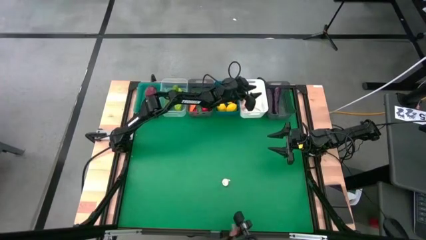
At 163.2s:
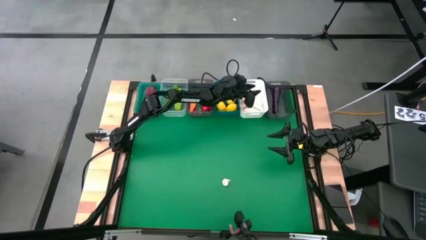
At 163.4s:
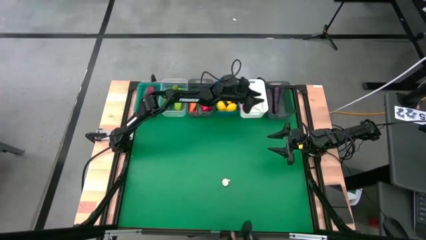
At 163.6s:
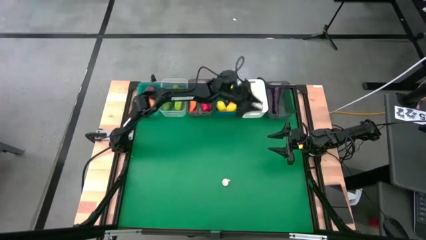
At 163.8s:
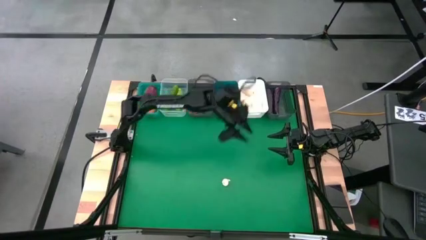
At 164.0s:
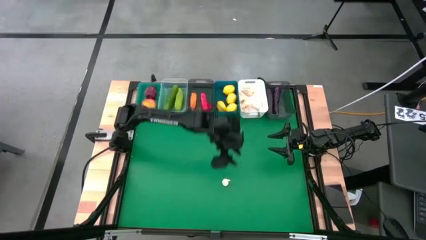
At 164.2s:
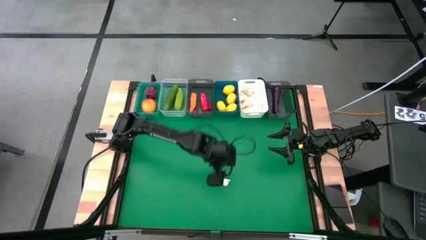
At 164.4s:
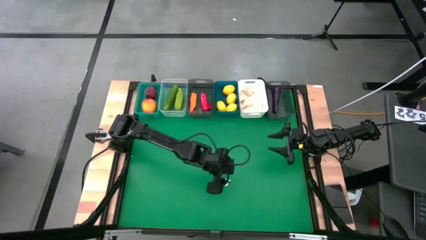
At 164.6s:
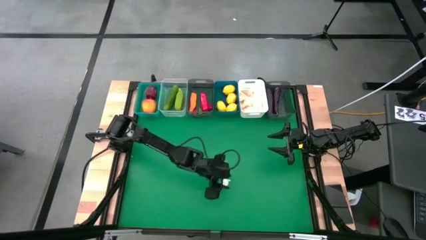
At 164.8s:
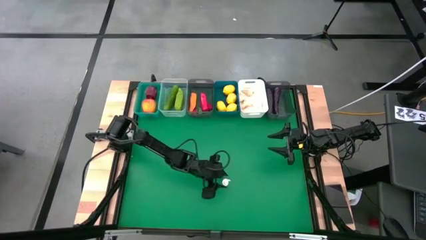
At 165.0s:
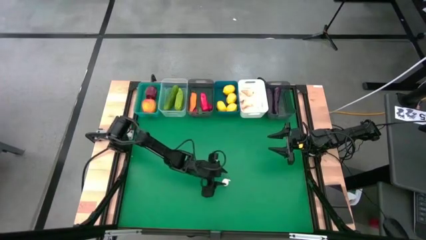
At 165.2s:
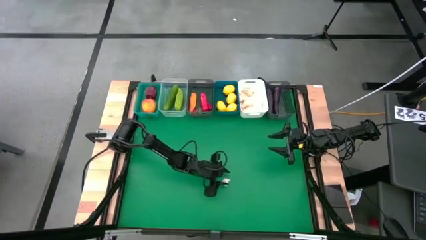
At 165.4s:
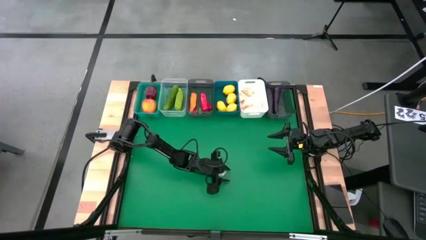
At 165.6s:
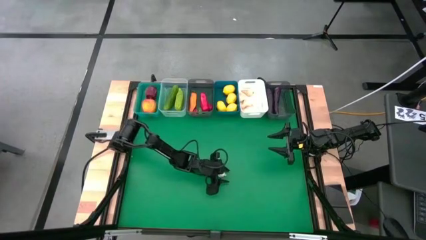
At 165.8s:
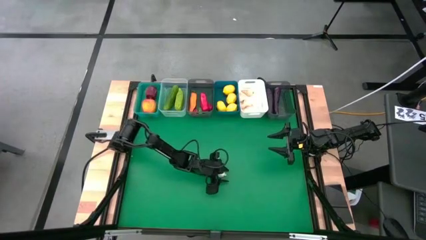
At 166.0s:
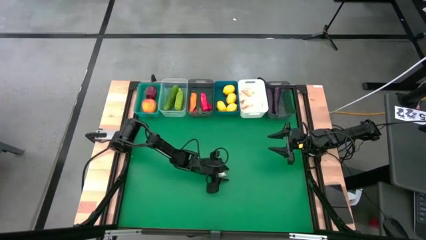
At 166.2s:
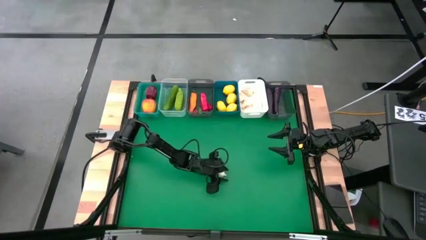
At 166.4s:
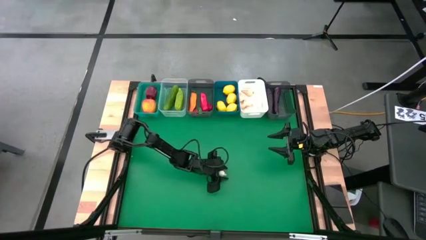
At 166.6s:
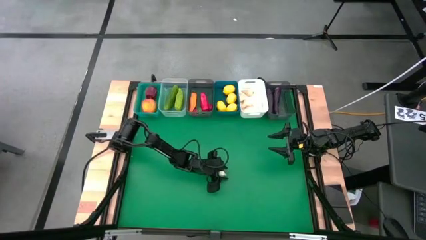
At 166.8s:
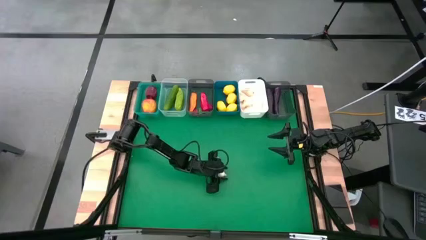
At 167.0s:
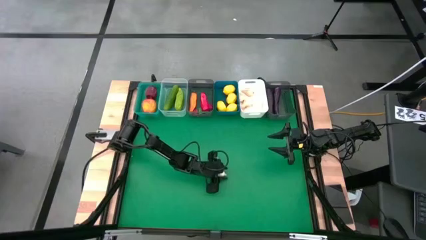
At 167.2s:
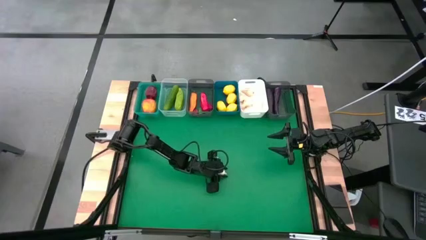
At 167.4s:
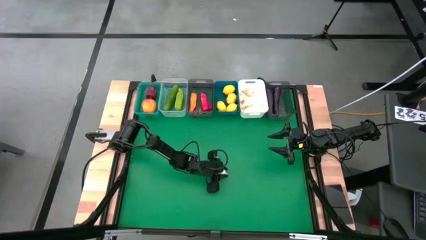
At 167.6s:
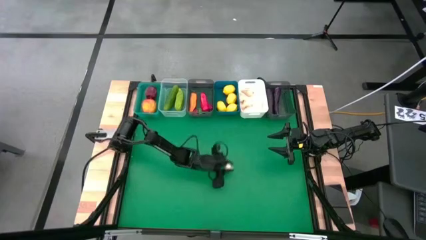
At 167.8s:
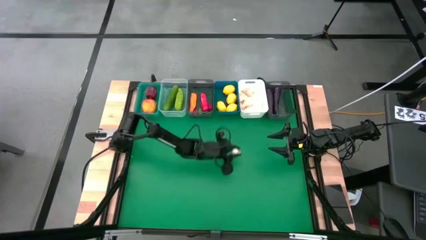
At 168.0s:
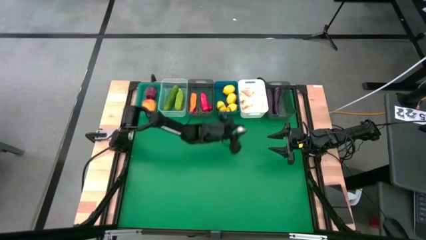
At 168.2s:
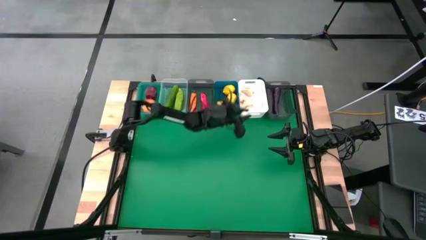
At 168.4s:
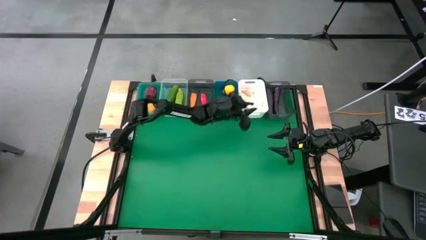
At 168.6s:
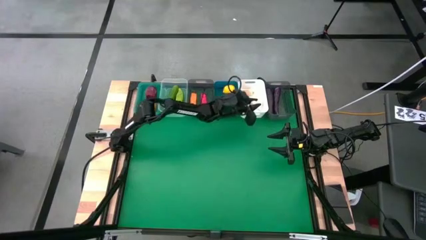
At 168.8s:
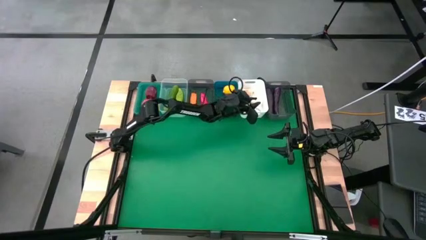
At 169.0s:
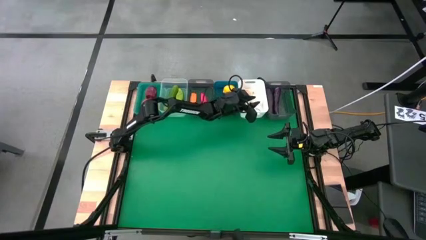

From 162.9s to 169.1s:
Task: Sort produce into baskets
Put the garlic into the white bin

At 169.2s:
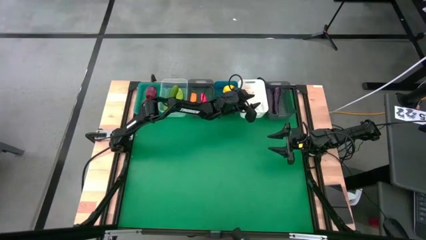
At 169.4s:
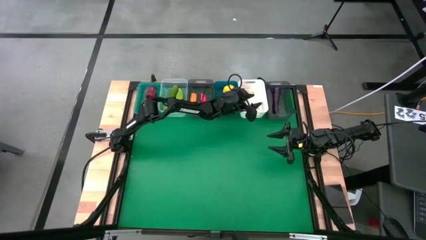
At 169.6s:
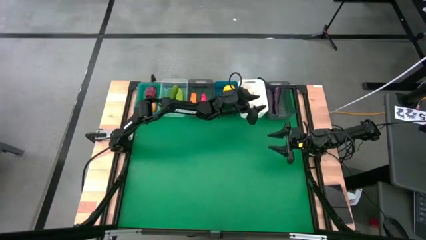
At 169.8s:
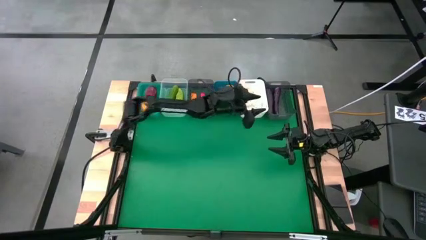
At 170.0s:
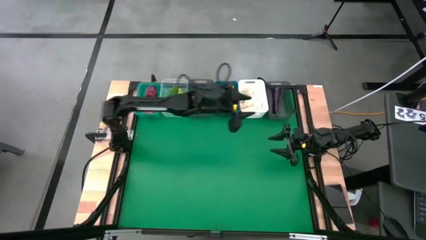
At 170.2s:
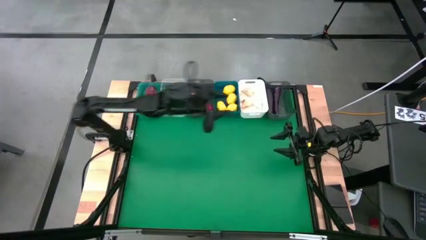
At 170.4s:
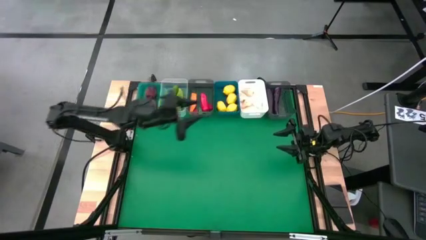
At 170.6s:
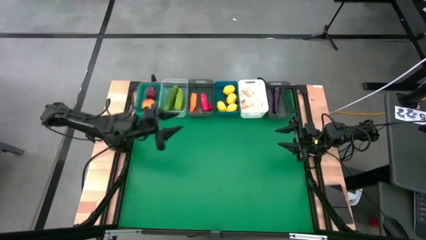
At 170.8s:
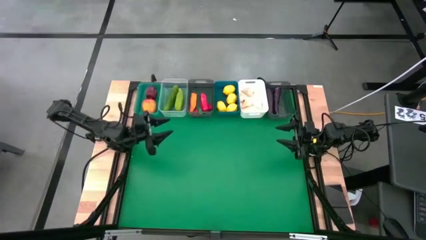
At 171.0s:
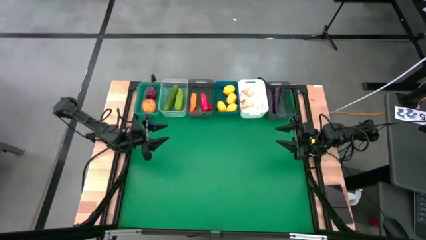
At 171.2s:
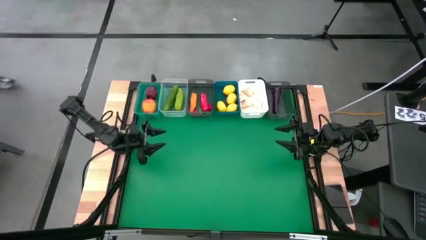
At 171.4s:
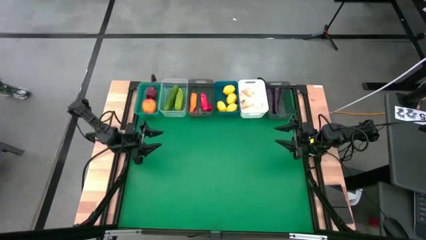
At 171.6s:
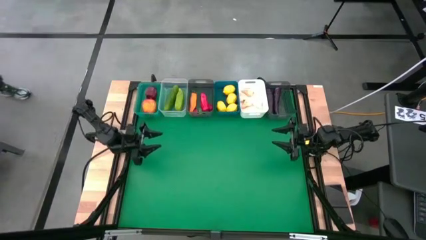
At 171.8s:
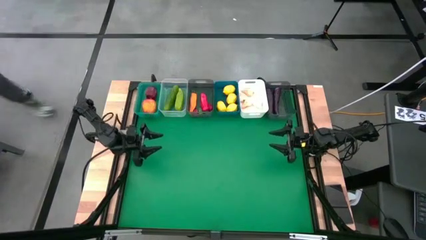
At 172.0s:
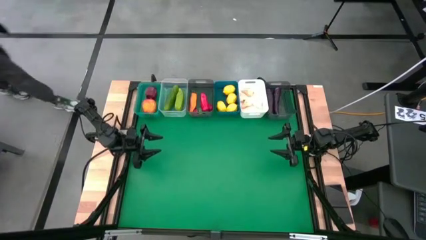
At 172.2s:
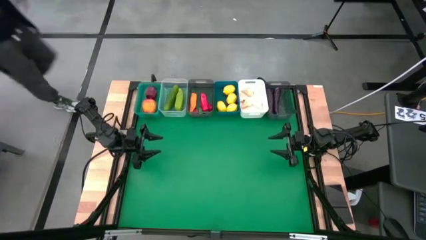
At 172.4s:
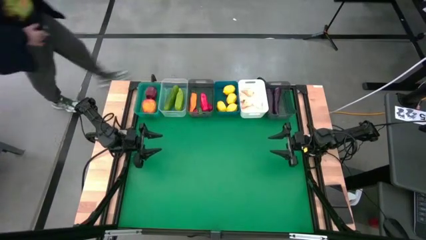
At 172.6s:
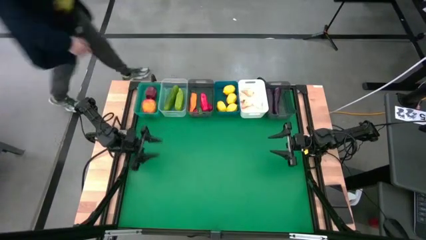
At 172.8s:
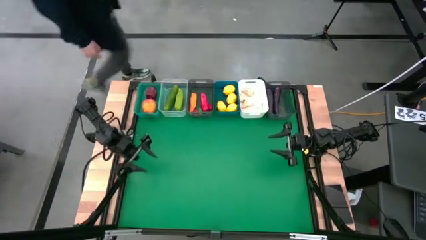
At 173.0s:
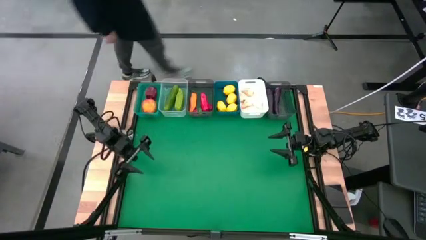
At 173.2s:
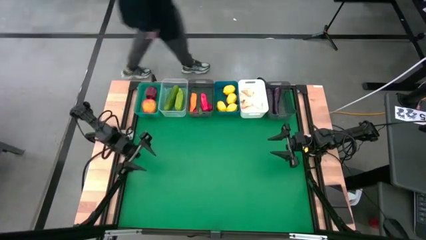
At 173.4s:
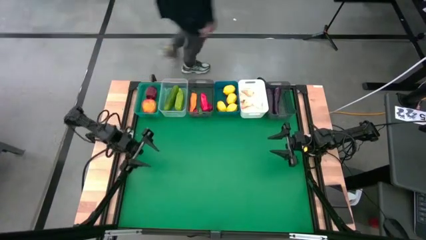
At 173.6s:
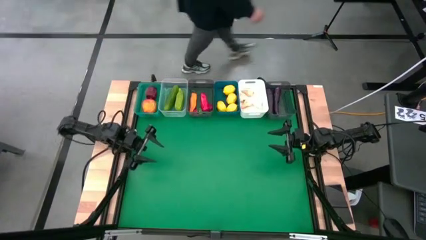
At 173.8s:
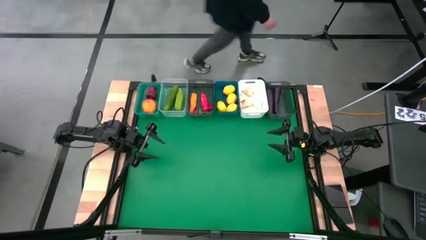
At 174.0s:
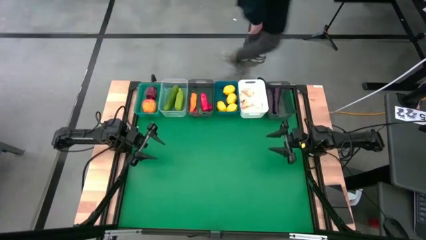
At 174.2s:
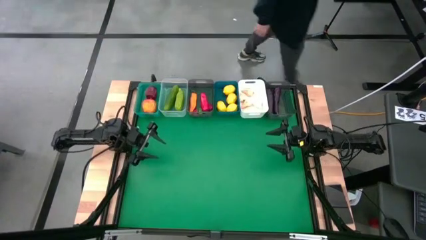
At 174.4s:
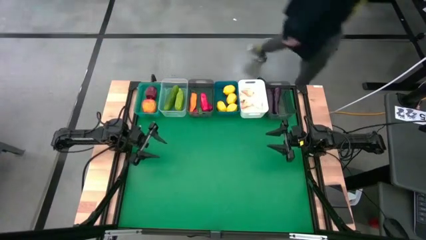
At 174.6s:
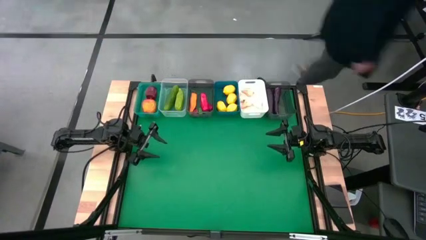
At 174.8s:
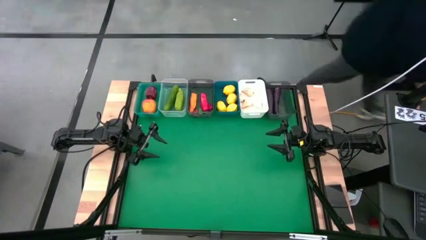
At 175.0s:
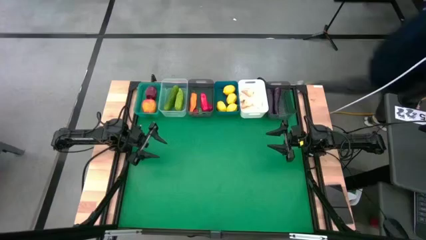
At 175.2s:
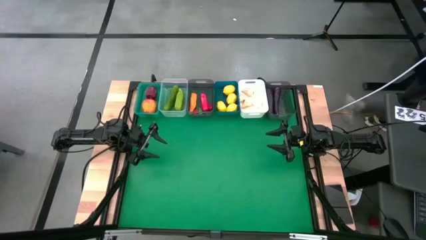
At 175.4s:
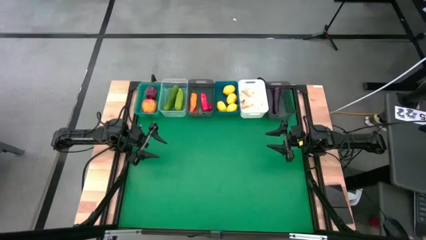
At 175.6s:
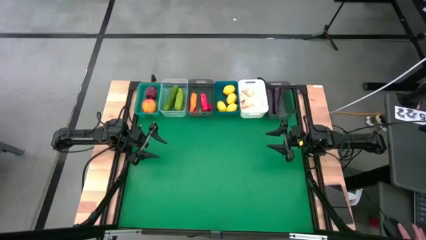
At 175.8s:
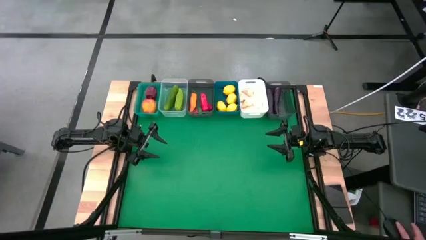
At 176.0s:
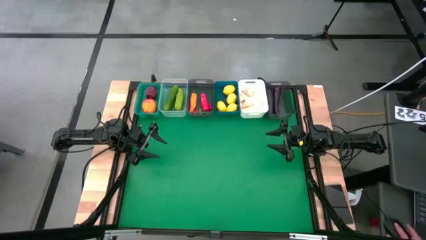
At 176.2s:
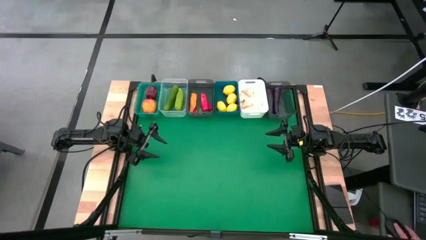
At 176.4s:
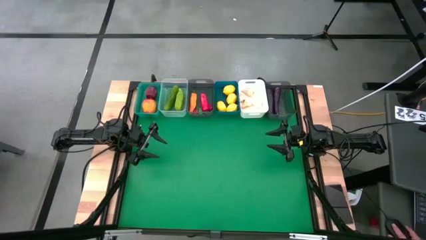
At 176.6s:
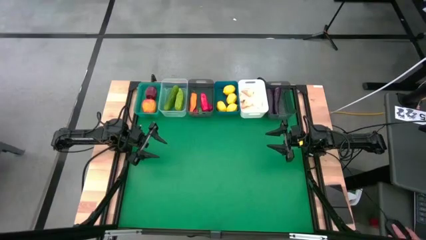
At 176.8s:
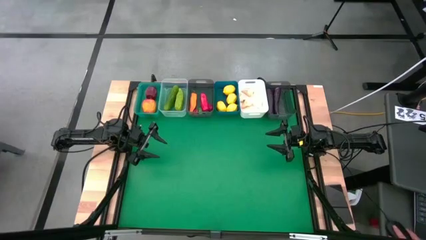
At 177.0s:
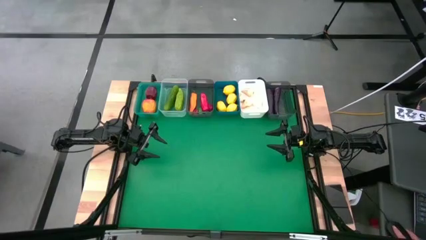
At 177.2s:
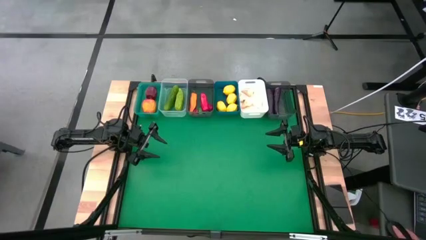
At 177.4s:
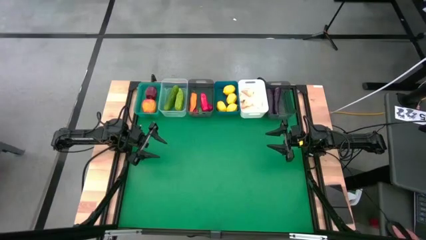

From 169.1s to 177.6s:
Return to Home Position
